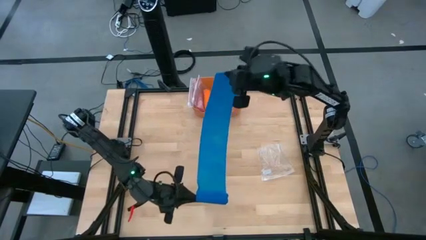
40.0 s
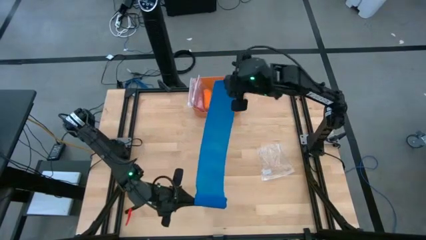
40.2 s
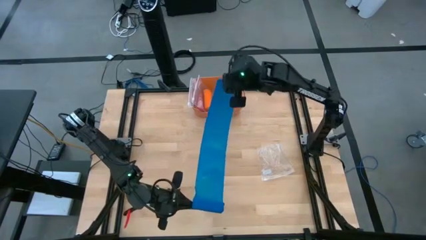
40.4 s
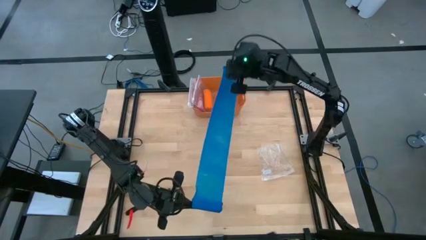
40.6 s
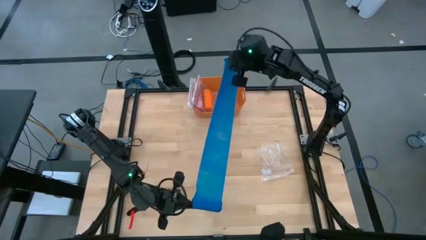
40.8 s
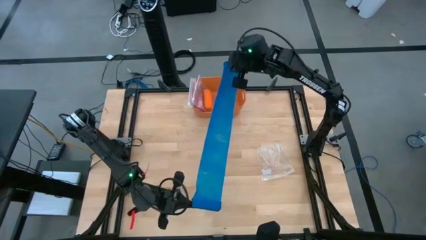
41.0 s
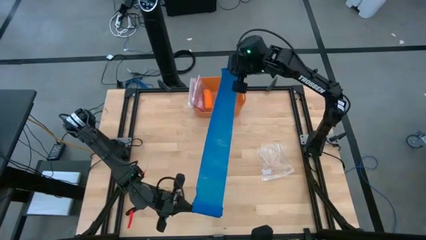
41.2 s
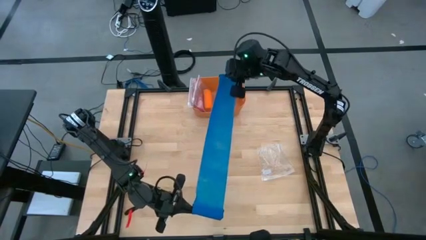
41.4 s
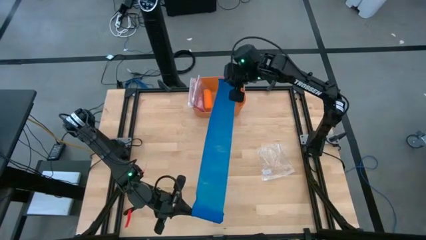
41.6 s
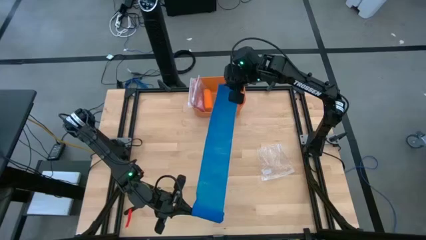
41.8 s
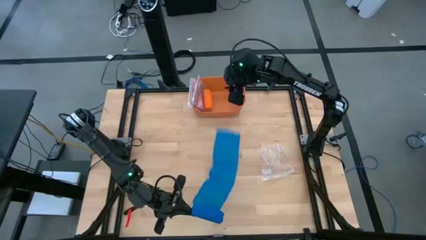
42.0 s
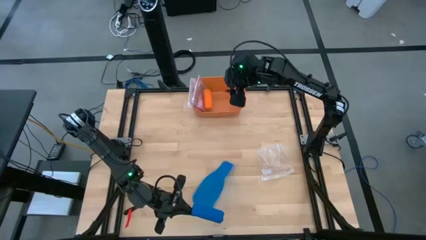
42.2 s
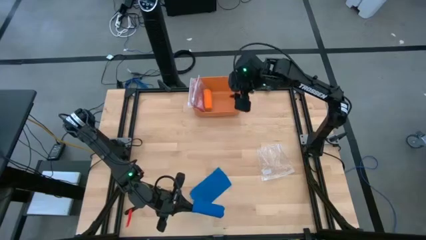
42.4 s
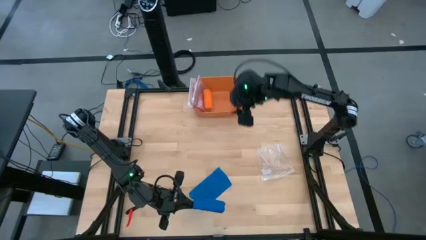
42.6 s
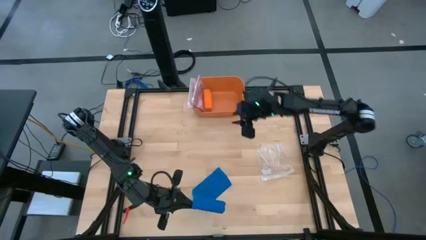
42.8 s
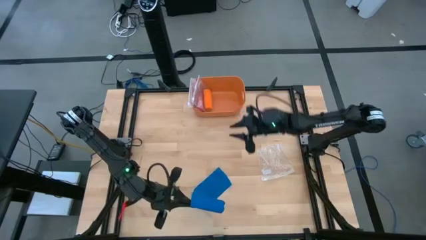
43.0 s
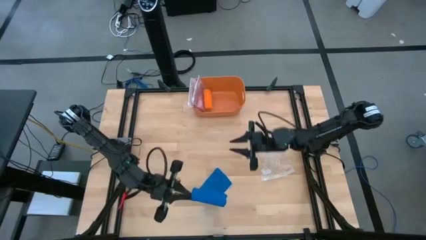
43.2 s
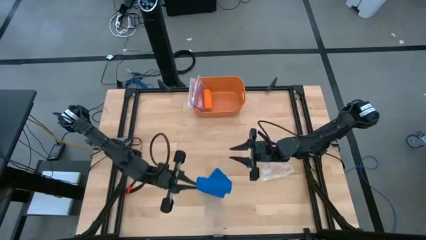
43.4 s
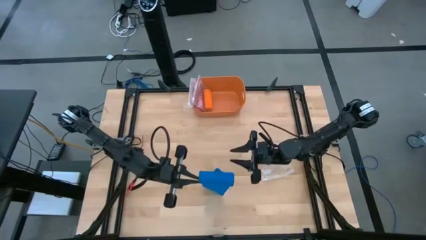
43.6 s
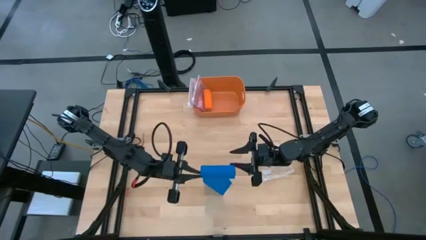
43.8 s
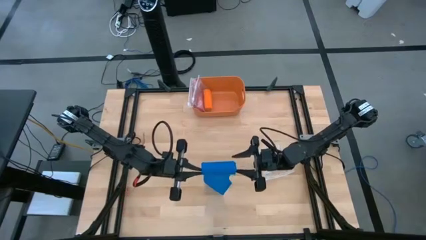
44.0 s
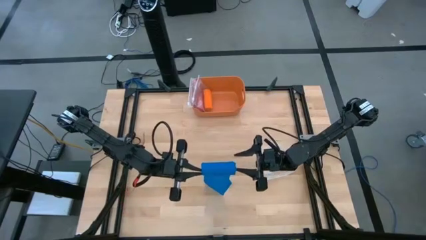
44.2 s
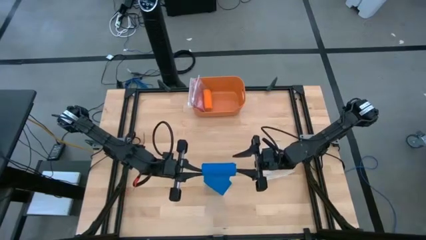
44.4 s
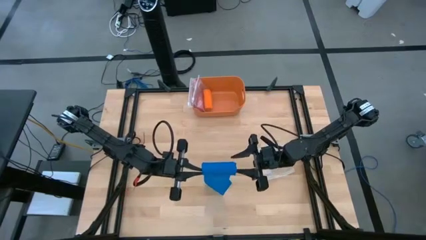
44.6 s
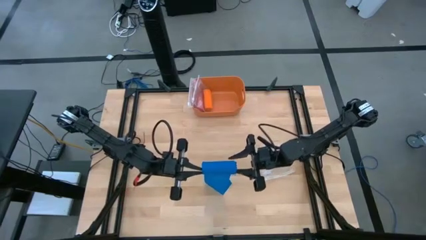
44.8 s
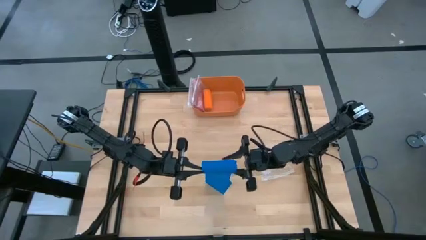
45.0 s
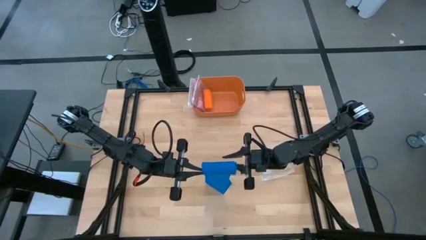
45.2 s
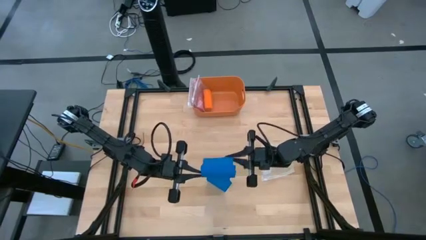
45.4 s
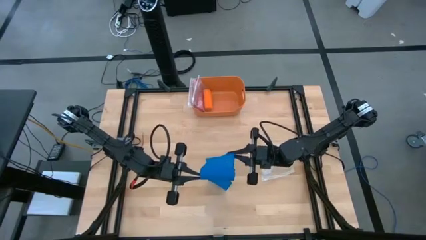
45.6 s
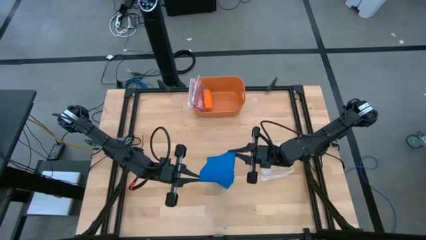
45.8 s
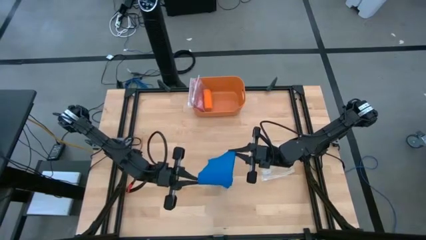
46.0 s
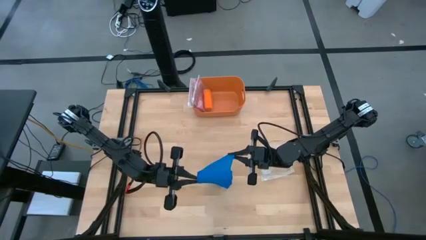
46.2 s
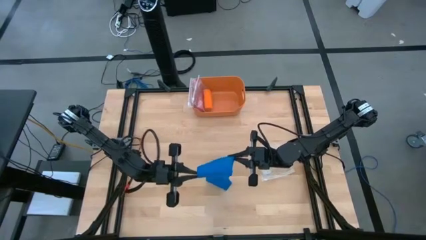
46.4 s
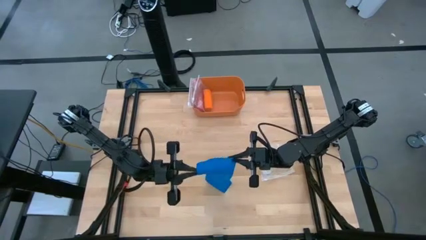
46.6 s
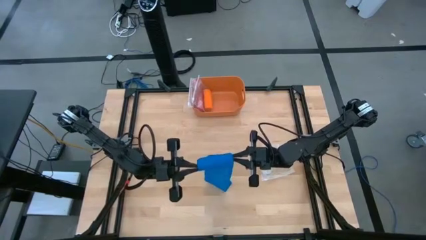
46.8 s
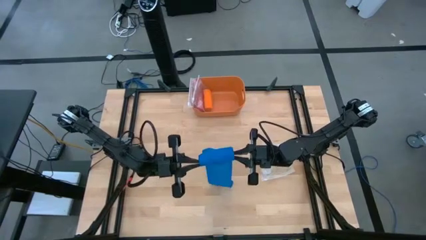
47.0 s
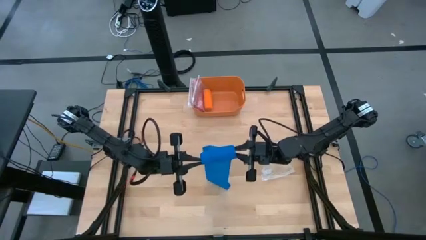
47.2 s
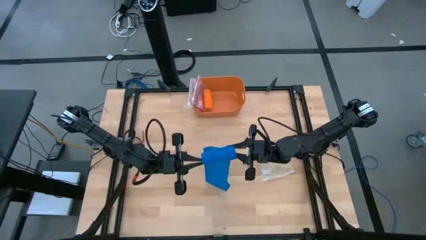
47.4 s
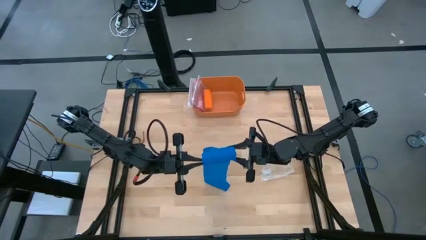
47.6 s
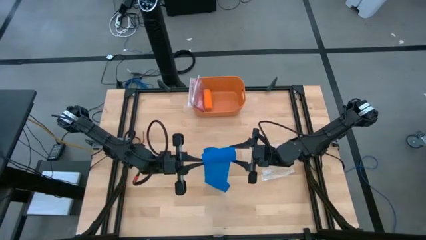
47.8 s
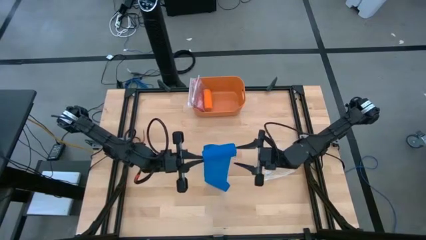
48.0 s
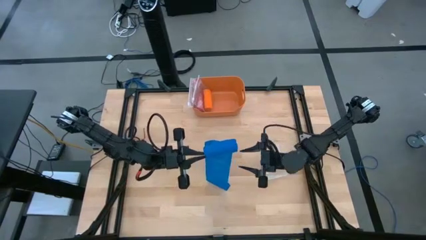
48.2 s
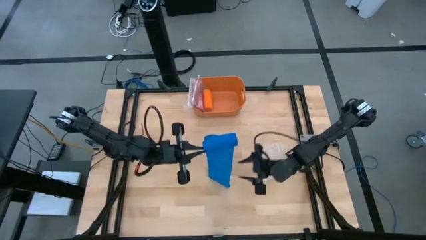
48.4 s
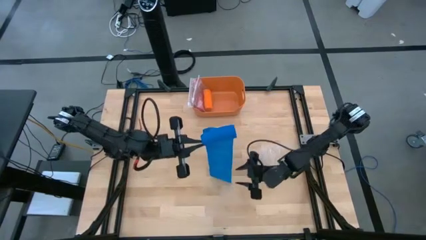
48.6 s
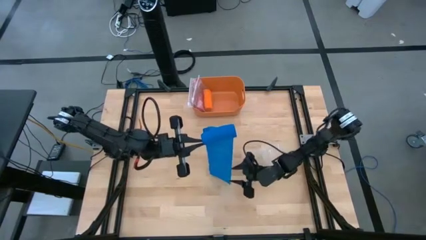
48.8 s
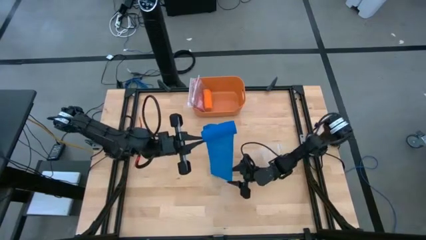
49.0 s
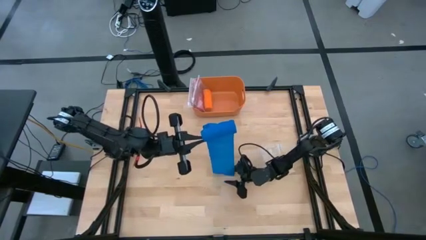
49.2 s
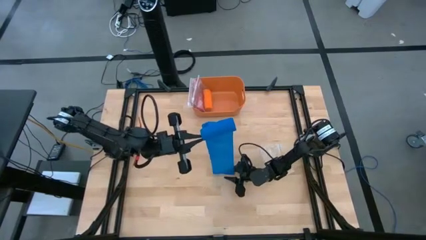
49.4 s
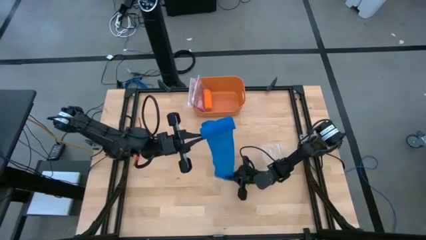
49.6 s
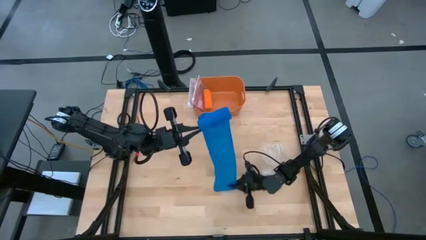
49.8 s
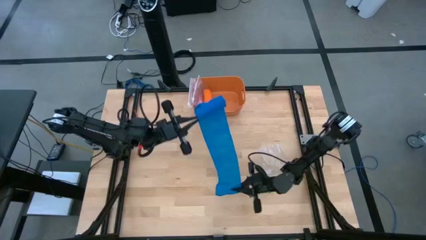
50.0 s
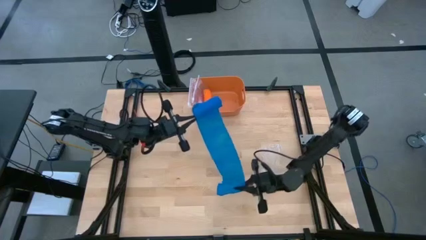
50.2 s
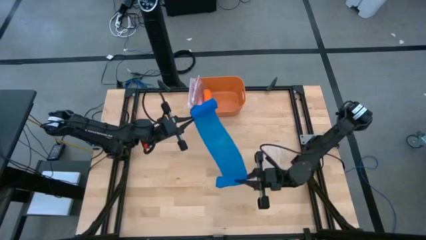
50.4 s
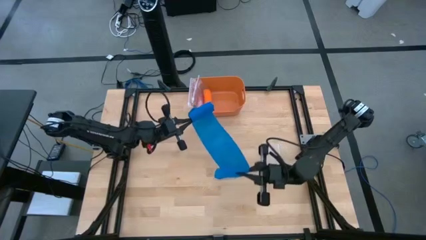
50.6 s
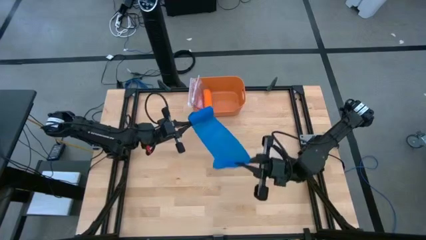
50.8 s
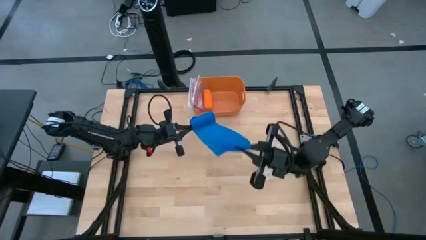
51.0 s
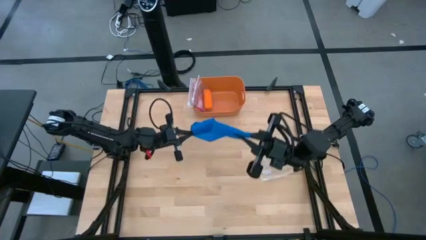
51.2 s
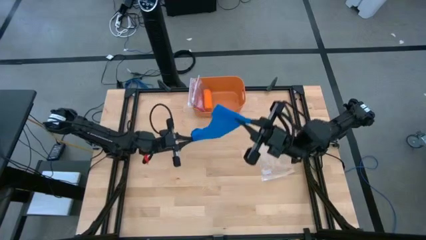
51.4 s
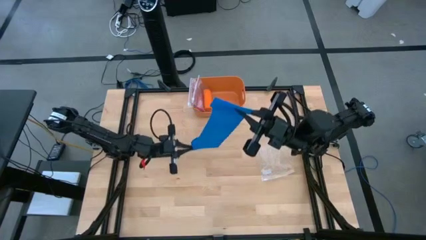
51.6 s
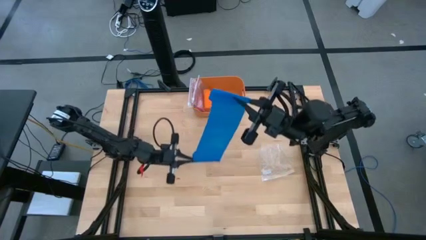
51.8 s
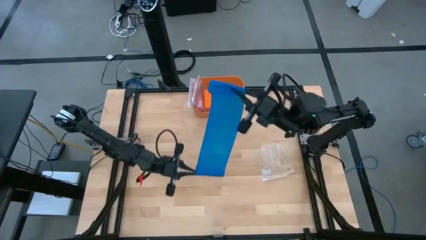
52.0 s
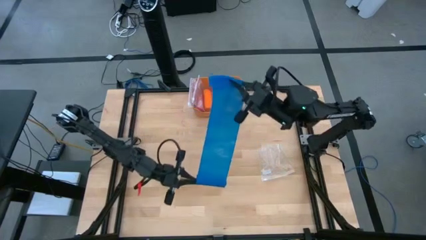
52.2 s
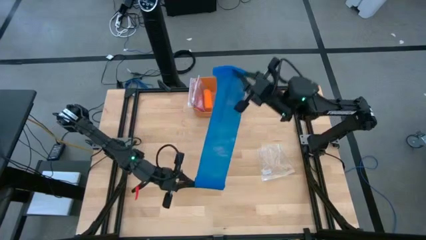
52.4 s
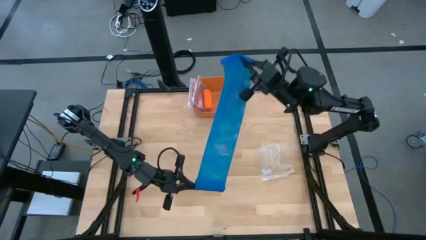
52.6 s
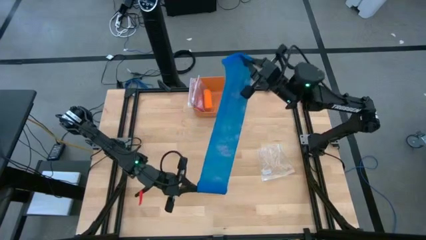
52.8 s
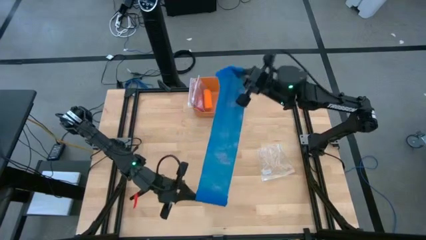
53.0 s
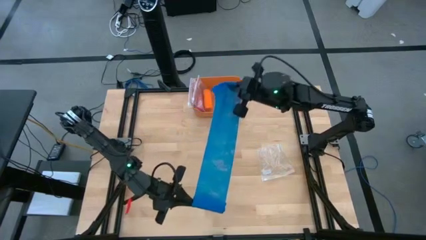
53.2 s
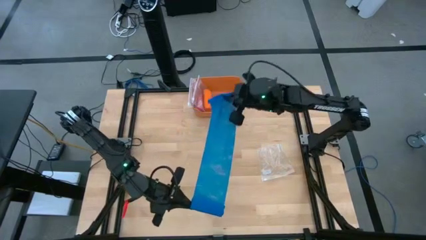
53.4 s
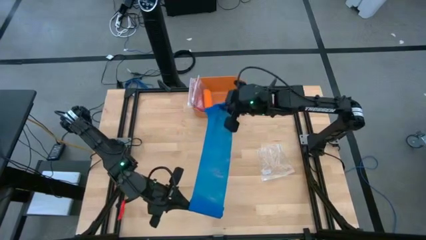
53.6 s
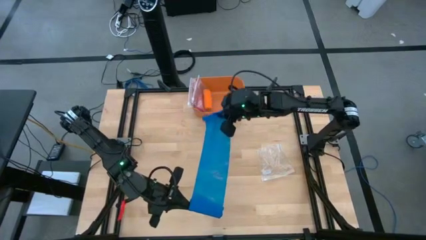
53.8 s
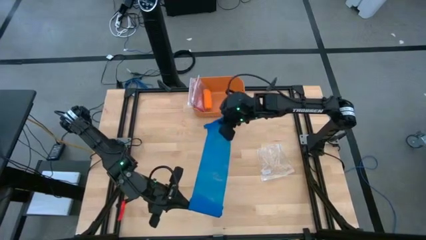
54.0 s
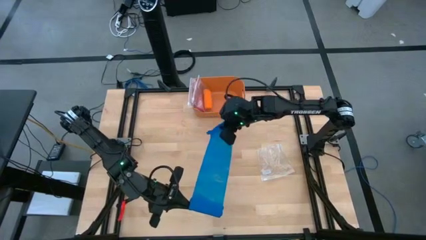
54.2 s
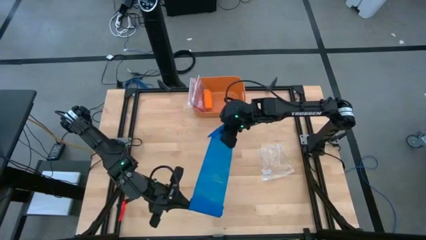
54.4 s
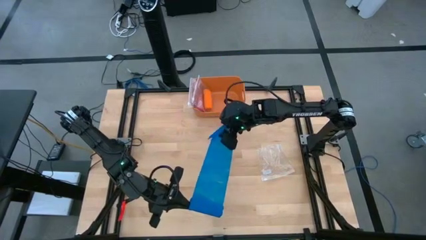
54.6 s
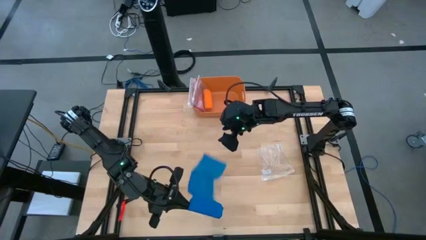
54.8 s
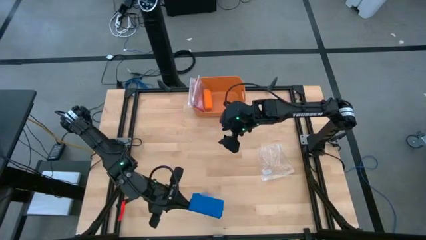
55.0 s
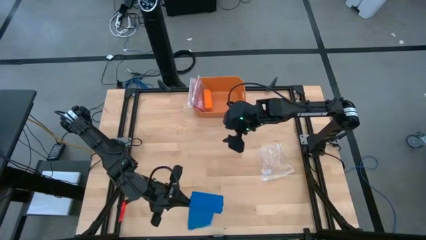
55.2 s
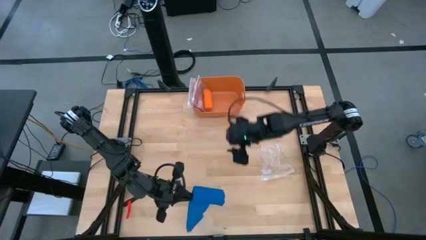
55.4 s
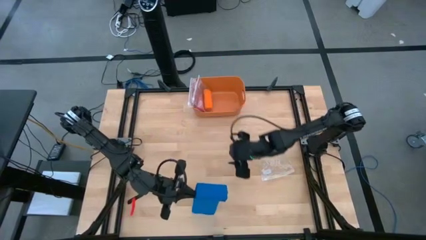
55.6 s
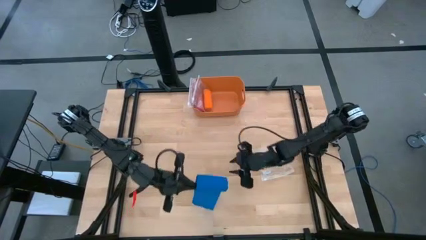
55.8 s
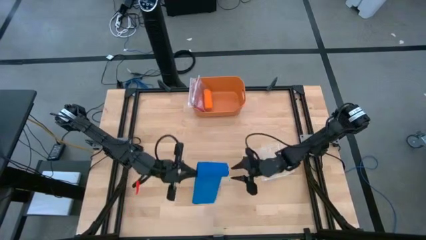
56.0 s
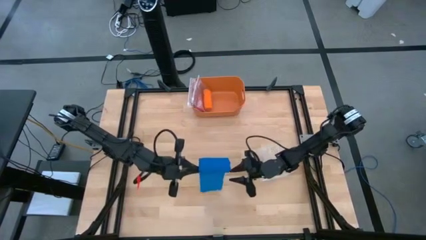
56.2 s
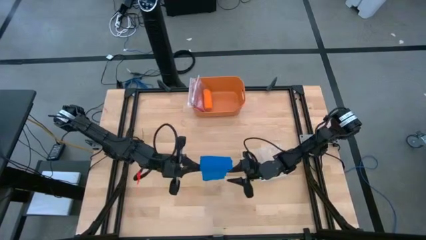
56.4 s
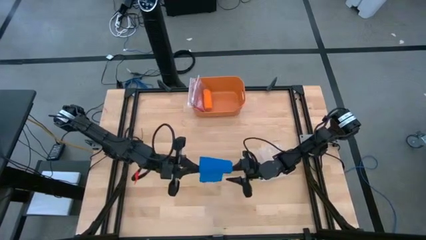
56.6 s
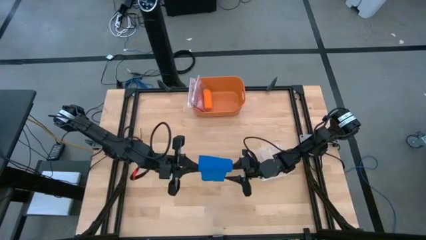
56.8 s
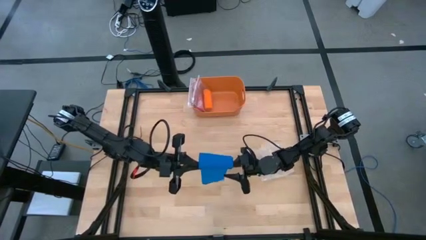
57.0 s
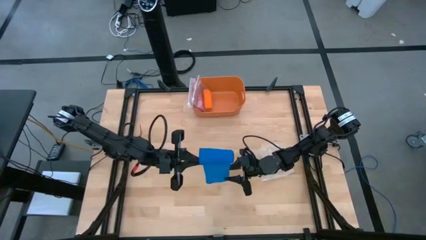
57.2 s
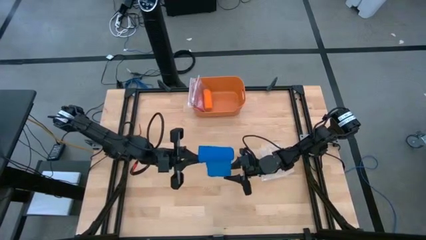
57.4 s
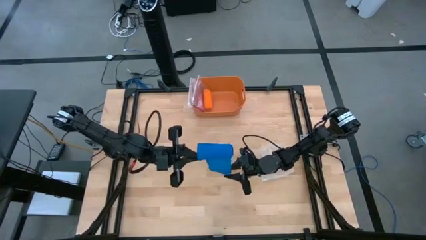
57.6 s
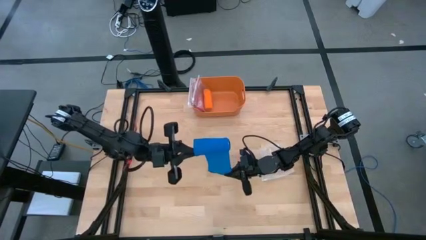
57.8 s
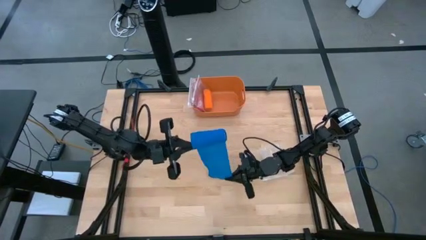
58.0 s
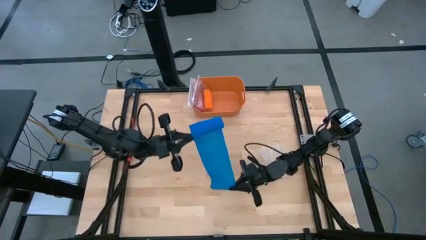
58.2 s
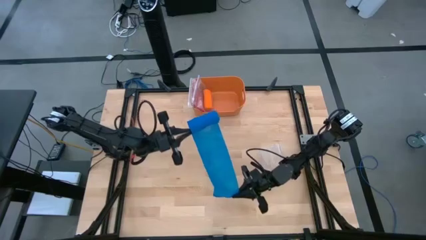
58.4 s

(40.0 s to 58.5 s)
Task: Roll bandage
Roll the blue bandage
